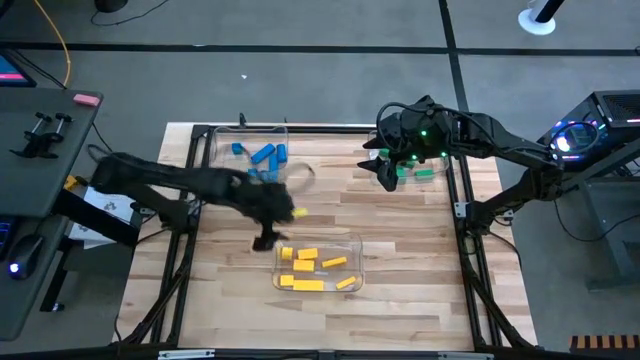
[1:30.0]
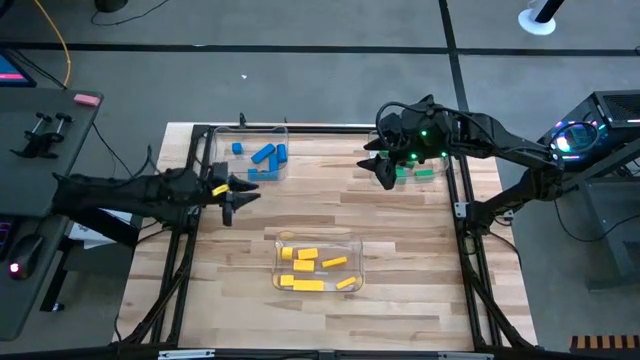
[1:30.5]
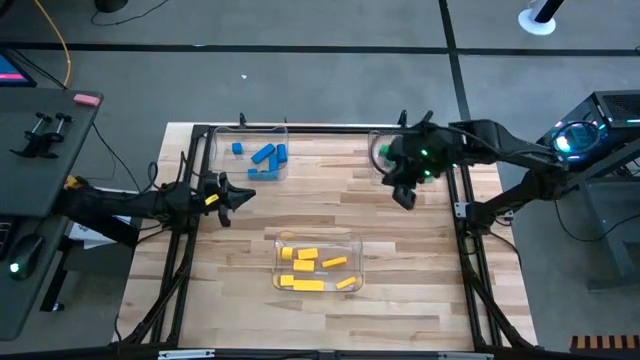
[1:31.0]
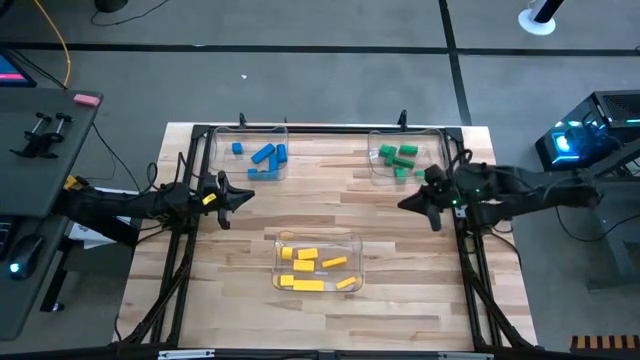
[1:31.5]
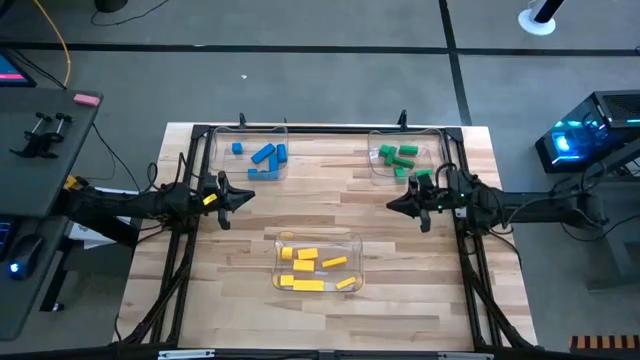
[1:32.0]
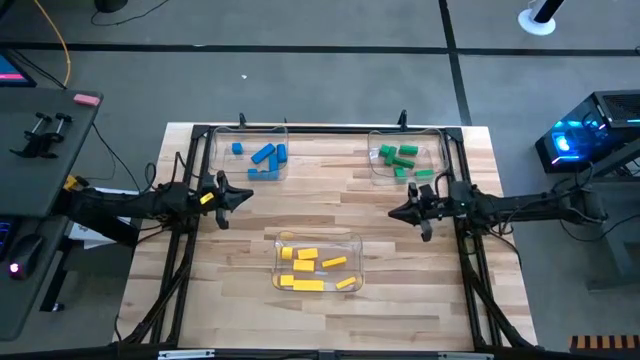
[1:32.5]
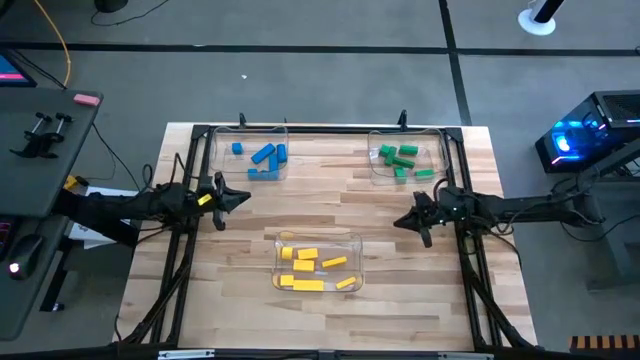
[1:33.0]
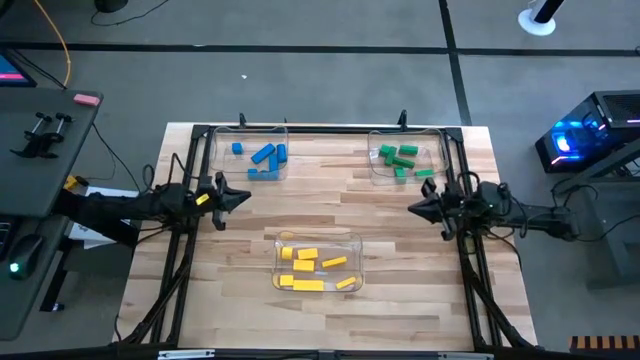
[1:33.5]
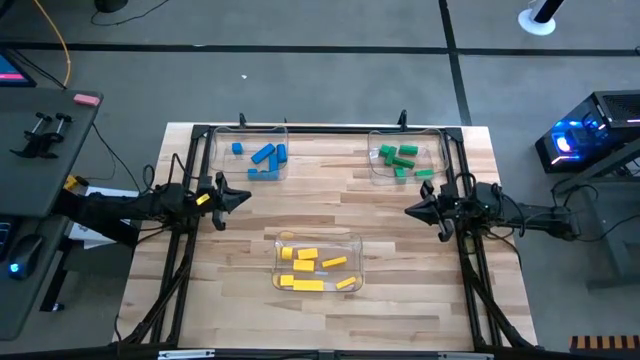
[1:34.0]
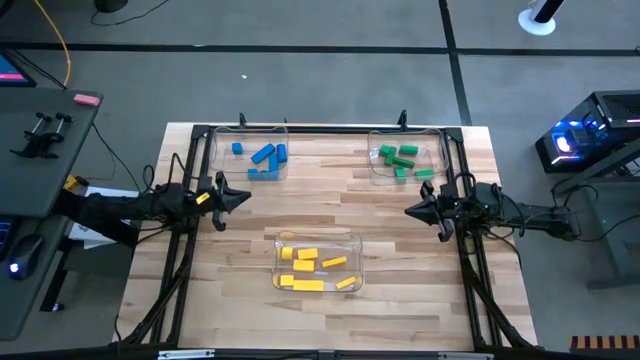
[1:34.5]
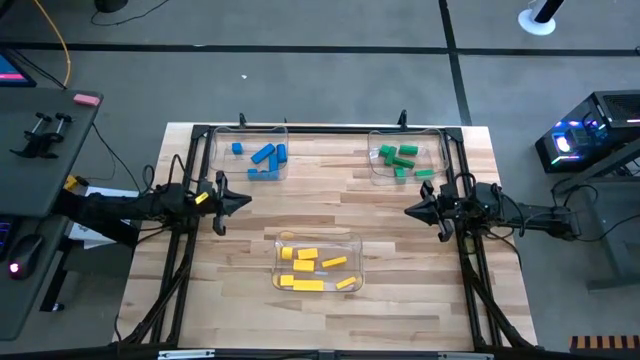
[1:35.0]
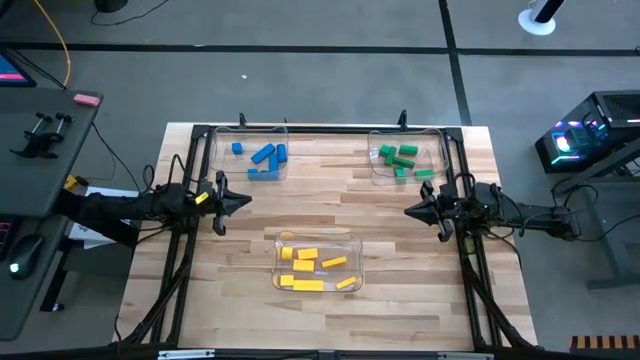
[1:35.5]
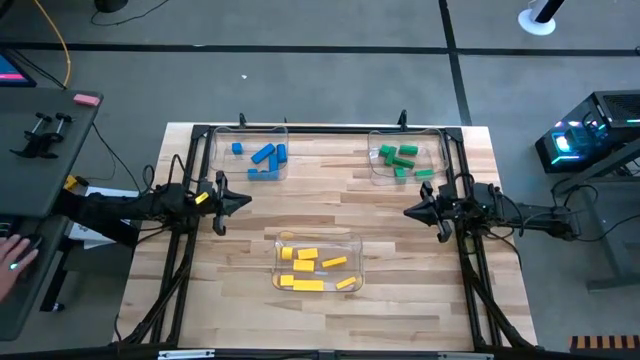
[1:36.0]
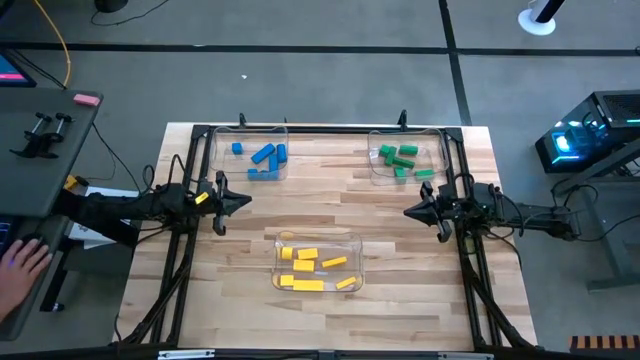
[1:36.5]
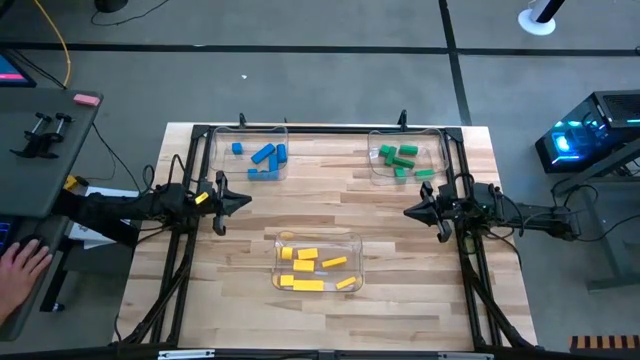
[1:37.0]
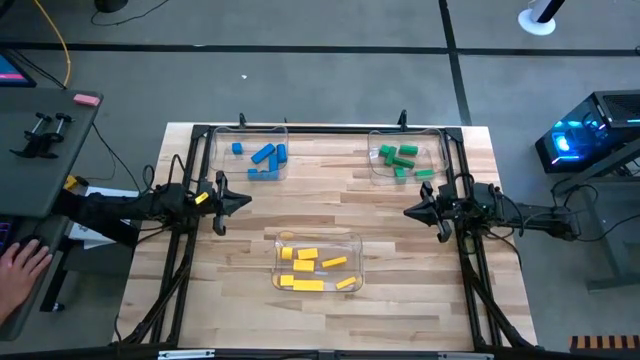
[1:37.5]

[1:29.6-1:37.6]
Task: Sort blocks
Return to Home Position

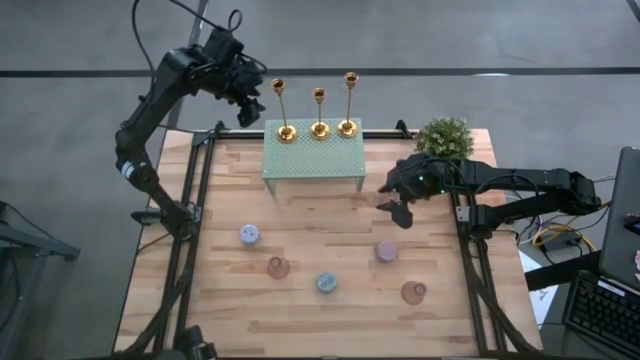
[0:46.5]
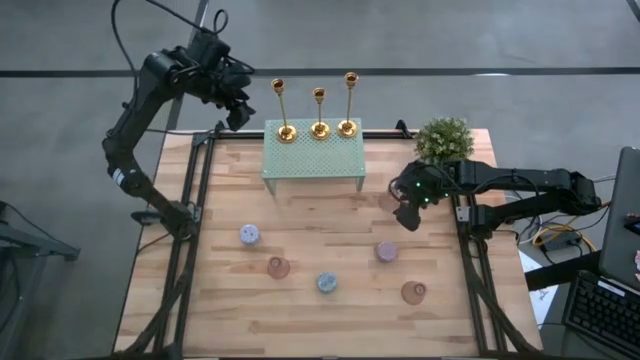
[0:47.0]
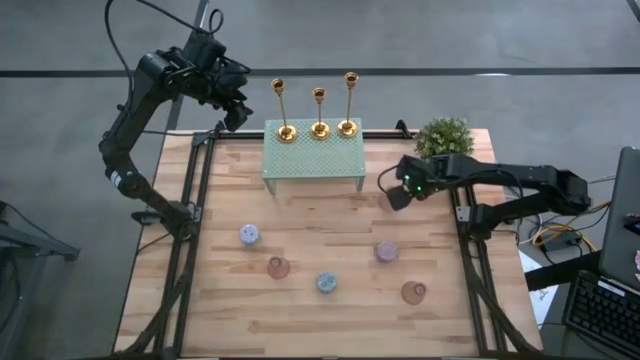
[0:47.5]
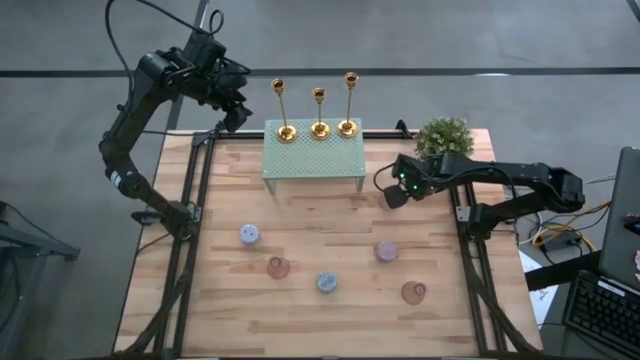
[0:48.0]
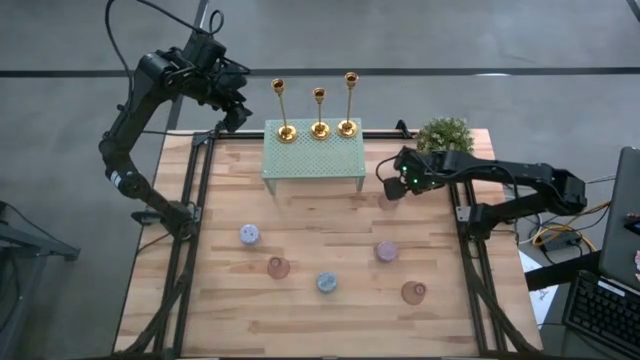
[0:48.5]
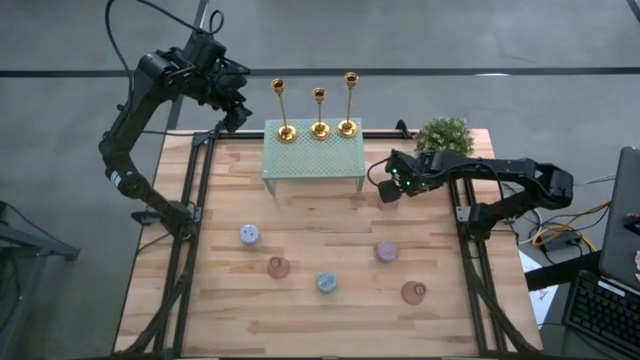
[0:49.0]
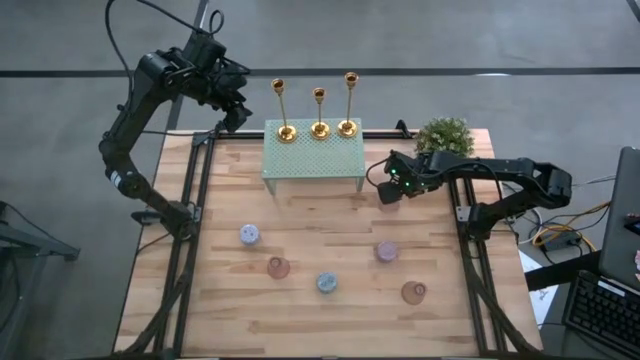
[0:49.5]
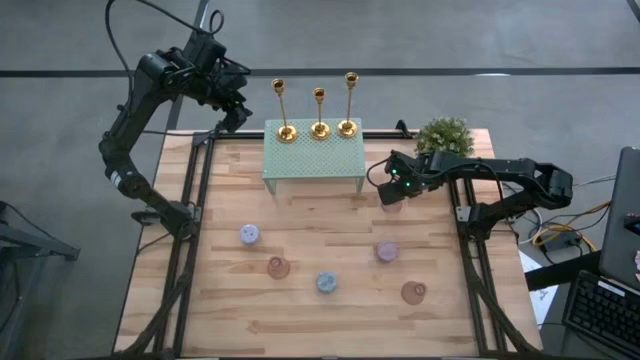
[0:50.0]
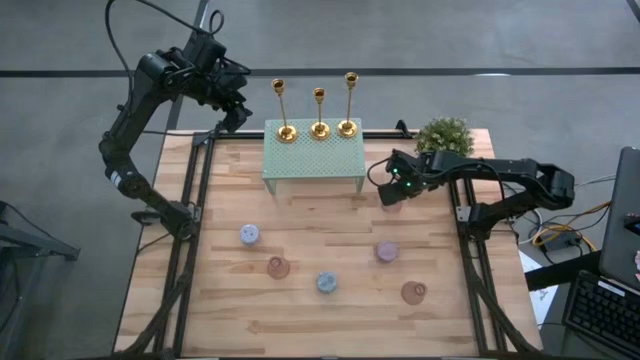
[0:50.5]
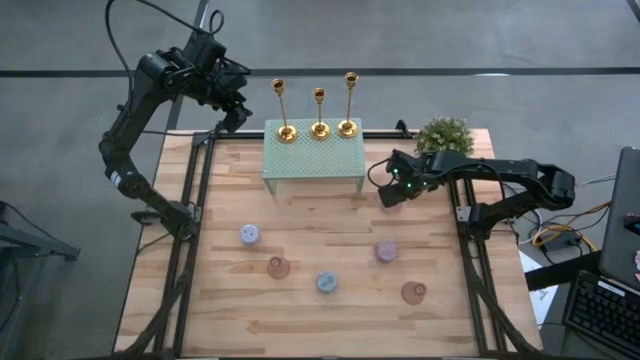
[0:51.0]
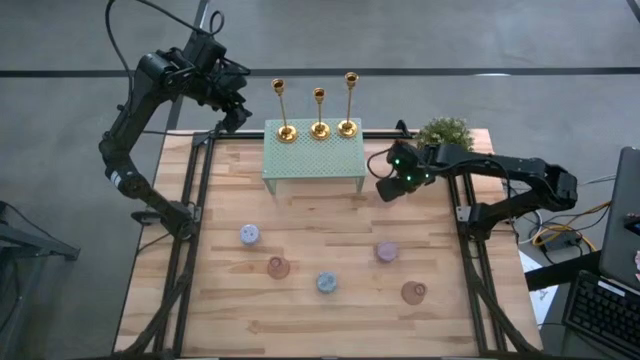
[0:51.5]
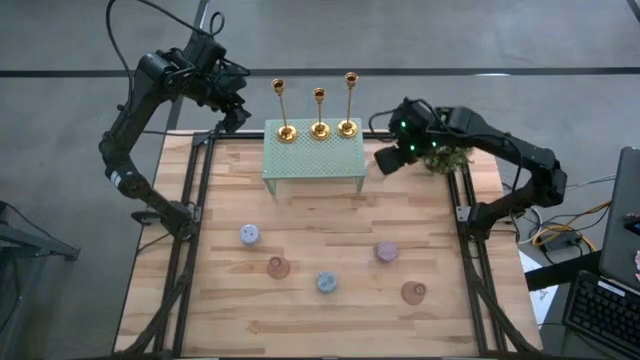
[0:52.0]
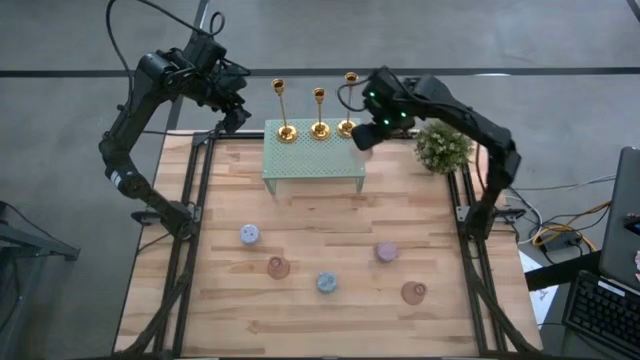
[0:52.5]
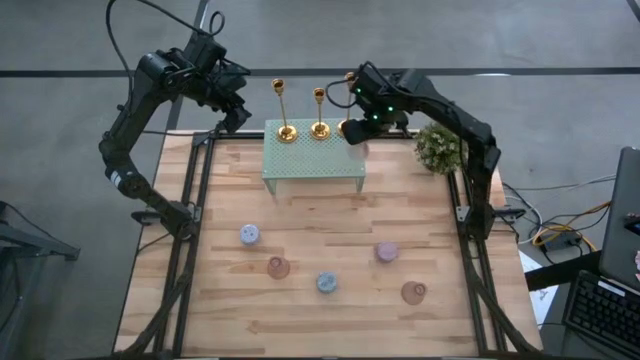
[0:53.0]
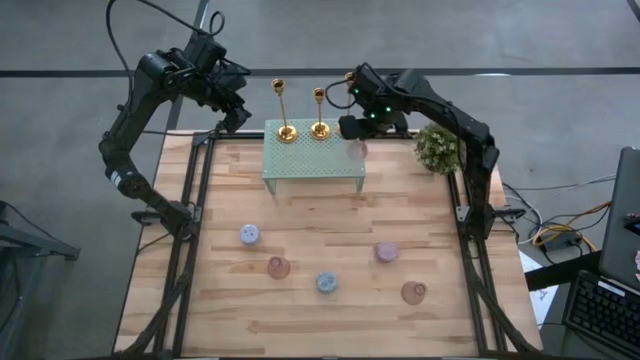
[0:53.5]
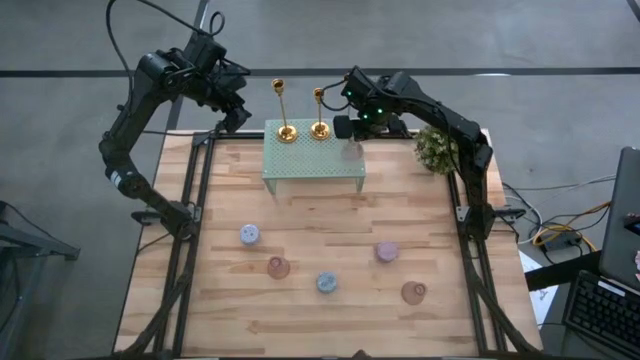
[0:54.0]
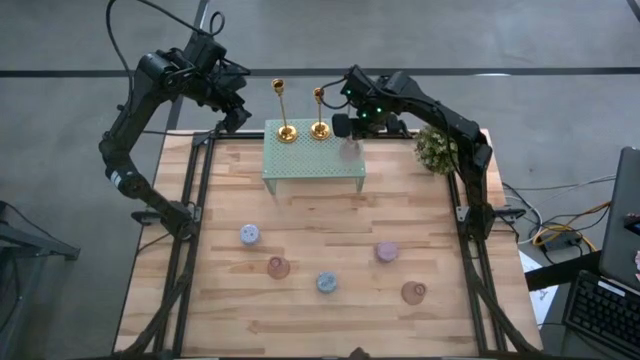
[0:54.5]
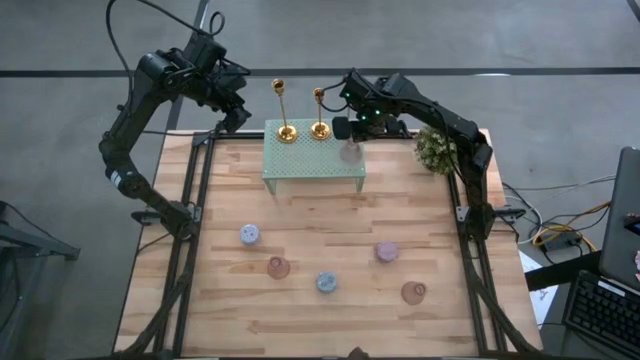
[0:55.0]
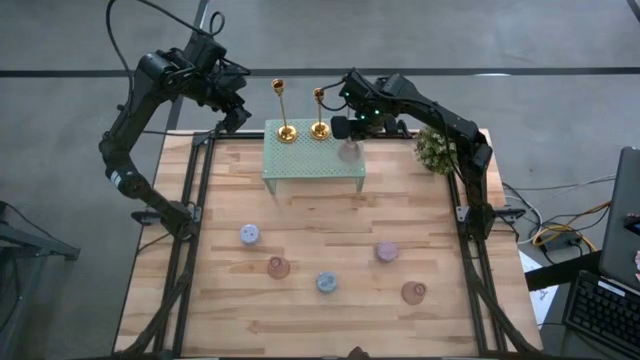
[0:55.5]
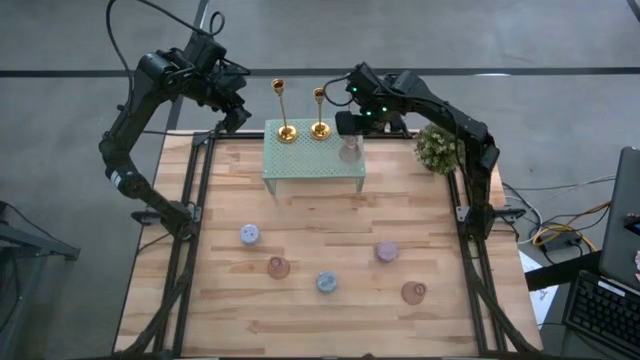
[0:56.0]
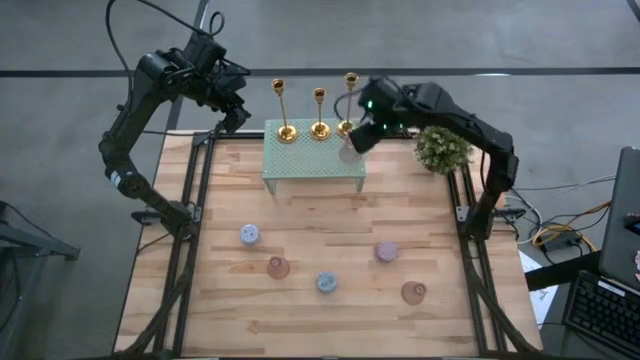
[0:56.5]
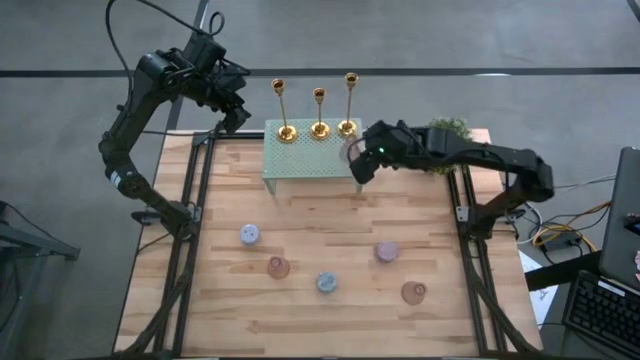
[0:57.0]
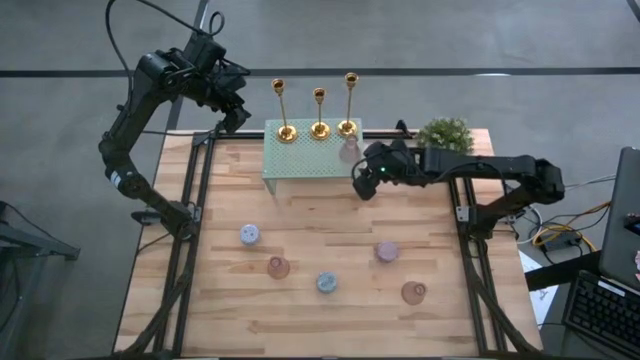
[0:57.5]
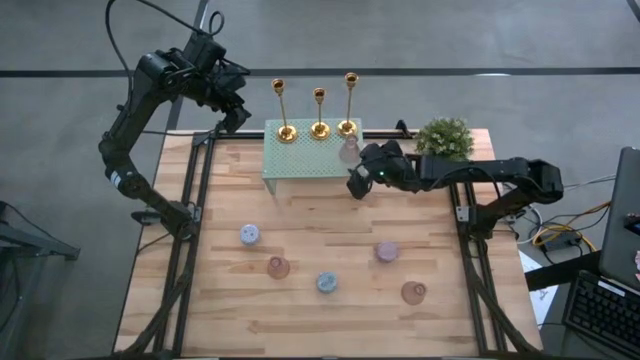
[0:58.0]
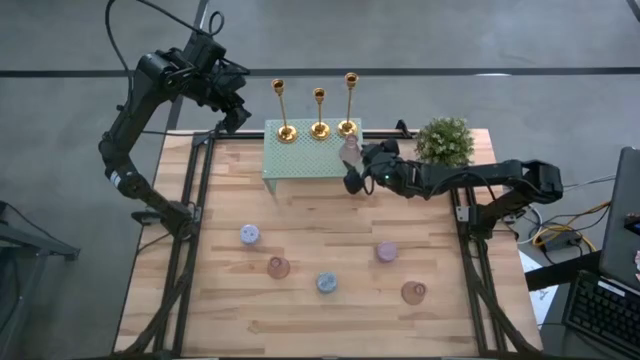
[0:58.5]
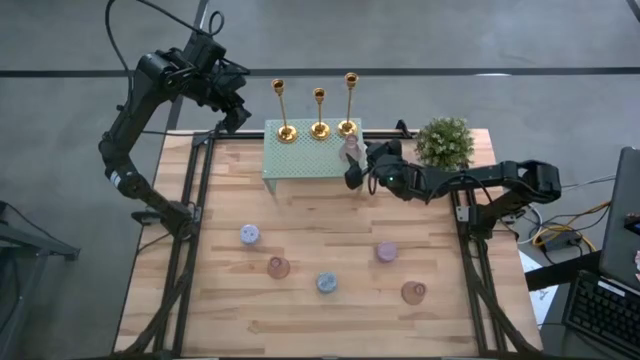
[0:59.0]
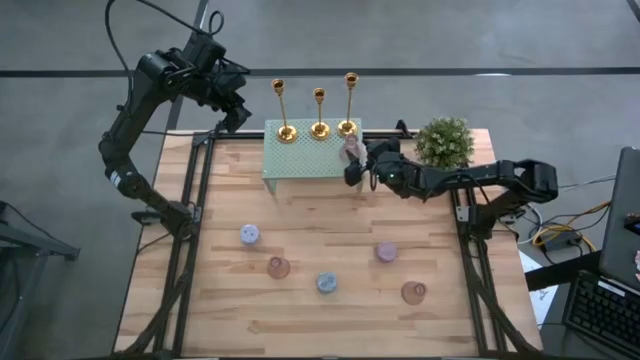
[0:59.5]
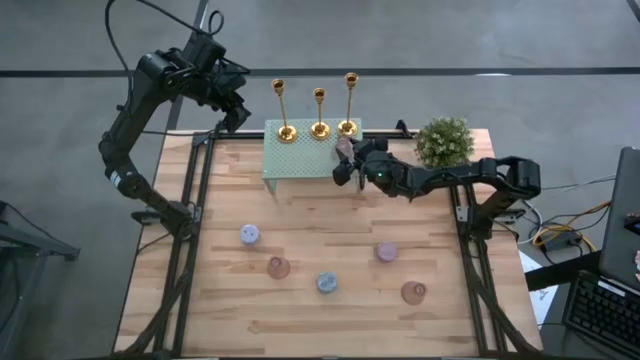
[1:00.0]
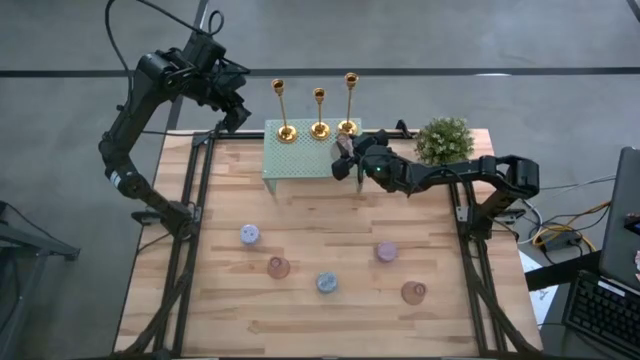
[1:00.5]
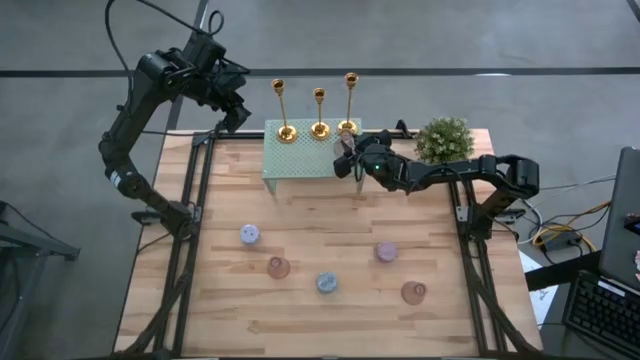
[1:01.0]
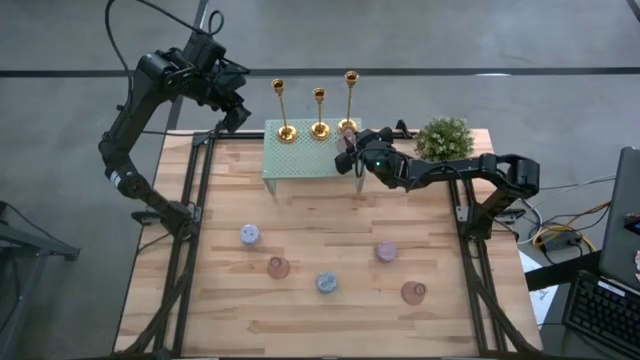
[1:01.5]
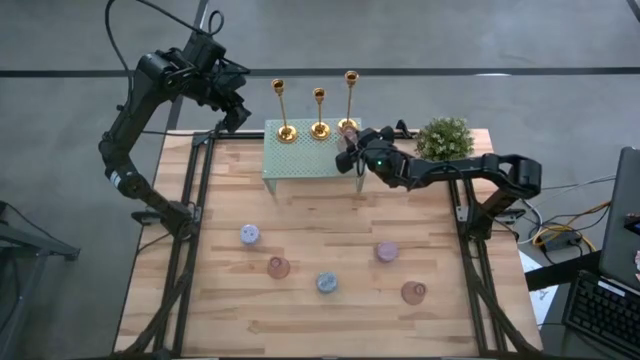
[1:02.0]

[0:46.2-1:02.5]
Task: Pick & Place candle stick holders
Put the top glass candle holder on the shelf
